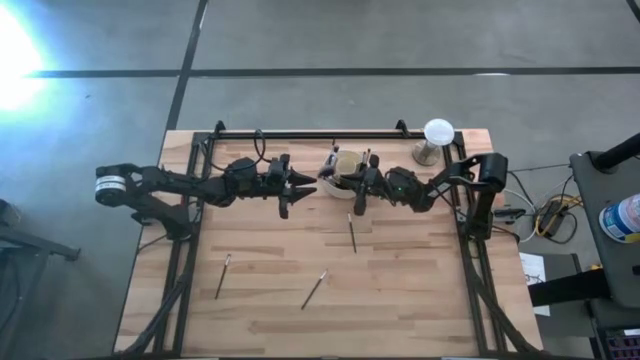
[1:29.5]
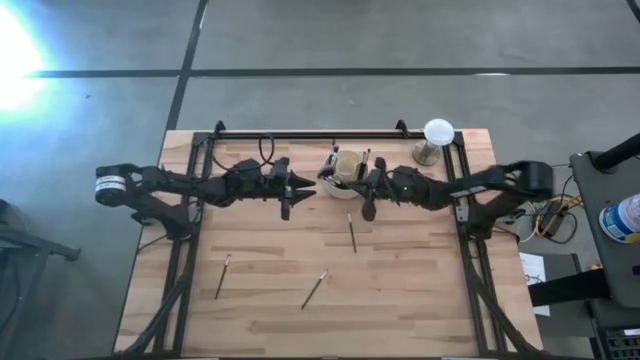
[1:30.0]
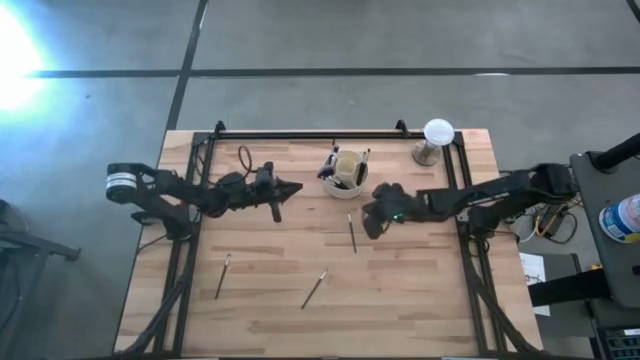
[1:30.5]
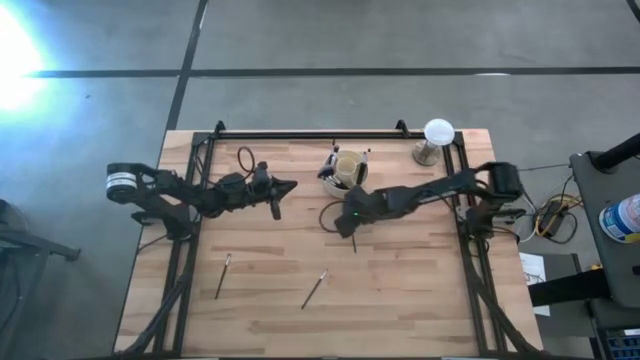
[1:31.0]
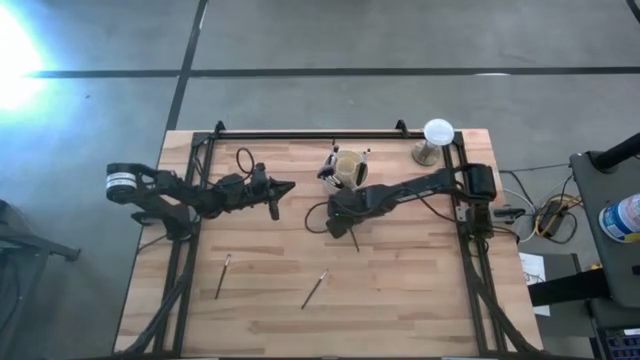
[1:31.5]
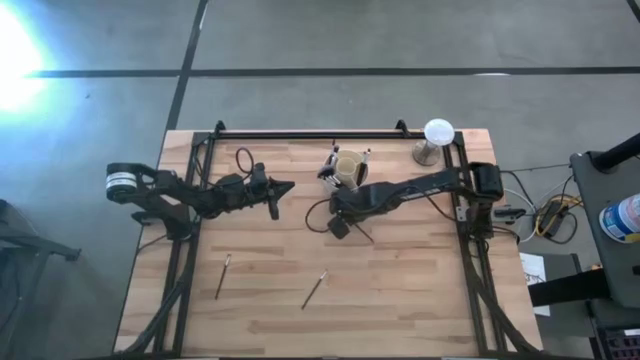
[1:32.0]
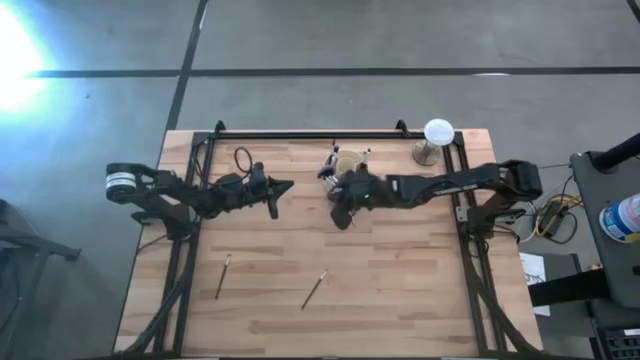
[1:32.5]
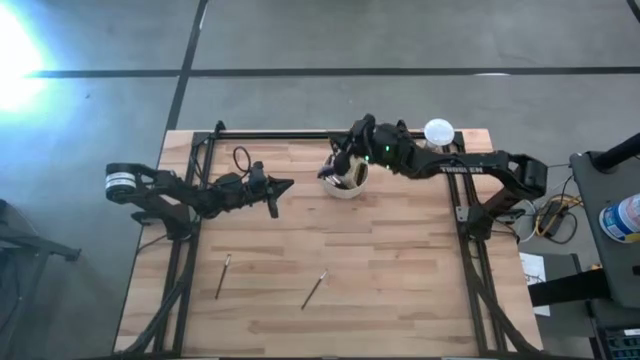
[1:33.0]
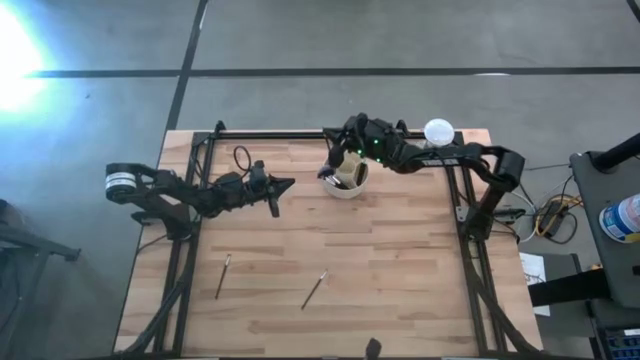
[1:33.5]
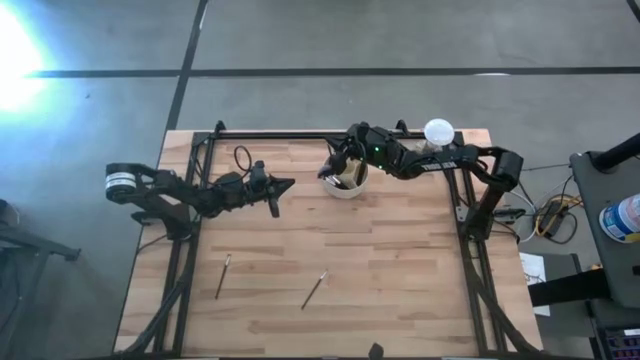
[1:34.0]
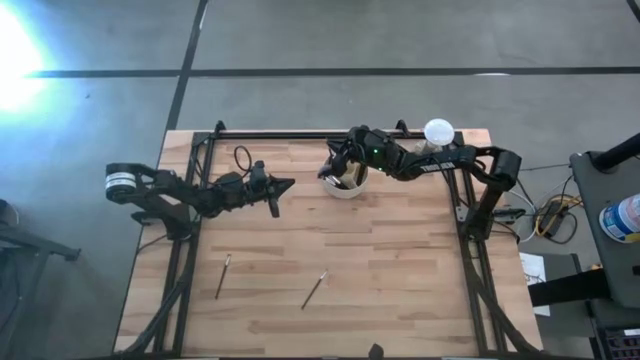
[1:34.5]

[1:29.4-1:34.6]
Task: Put items in baskets/containers
Put the black silver eyeshadow brush into the pen organizer

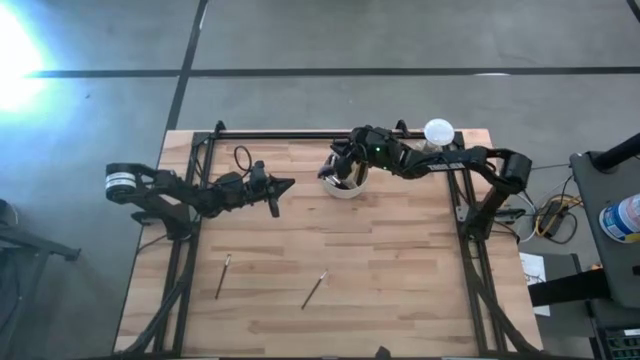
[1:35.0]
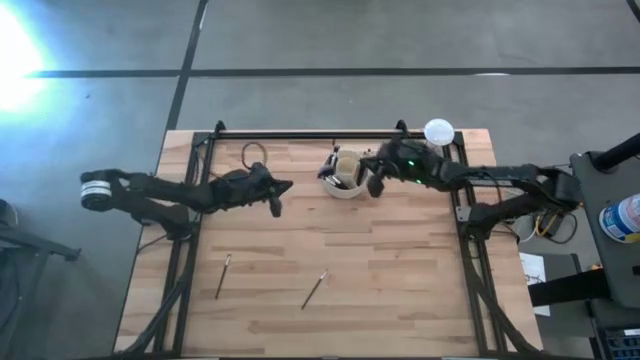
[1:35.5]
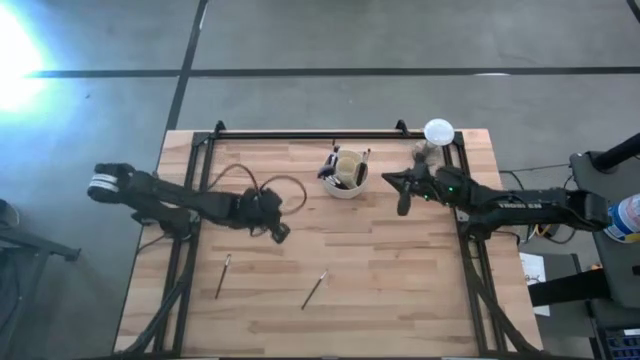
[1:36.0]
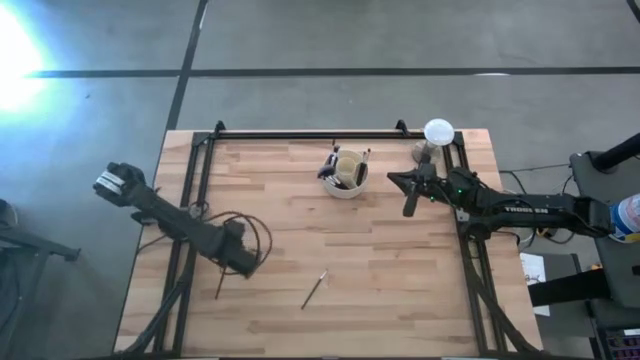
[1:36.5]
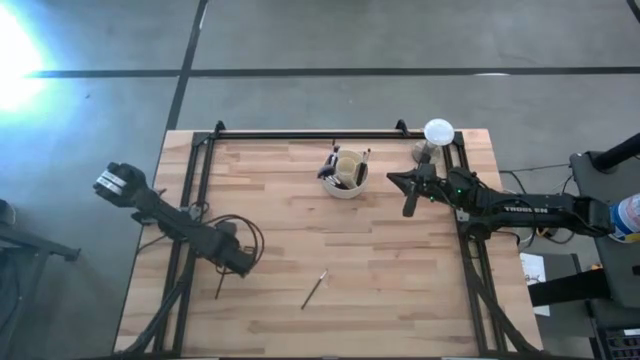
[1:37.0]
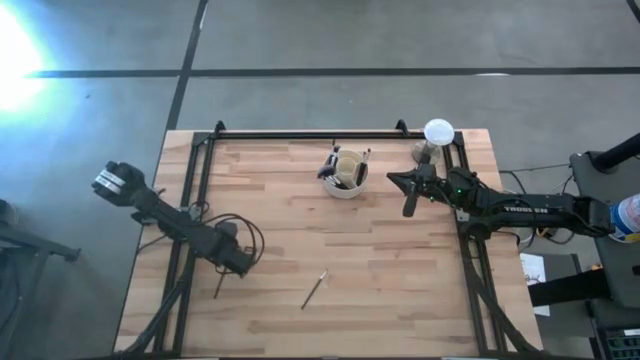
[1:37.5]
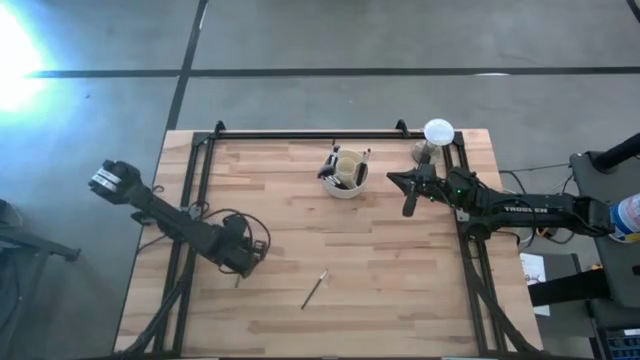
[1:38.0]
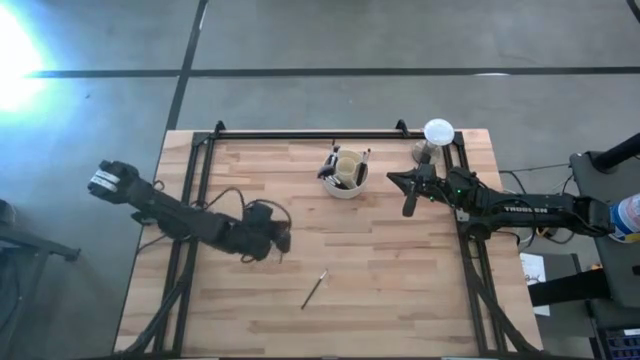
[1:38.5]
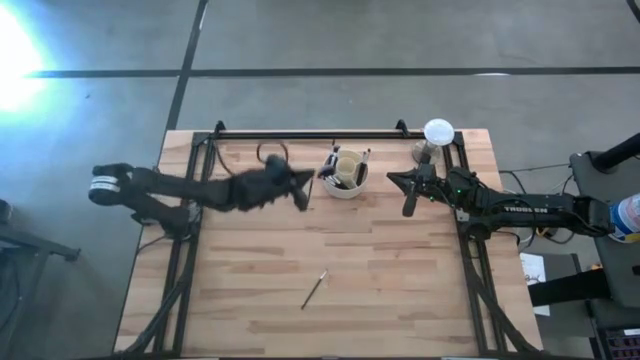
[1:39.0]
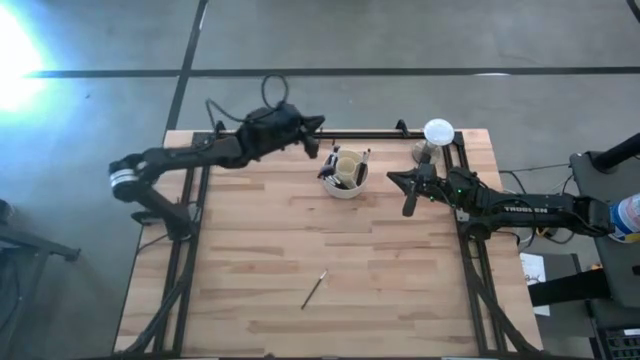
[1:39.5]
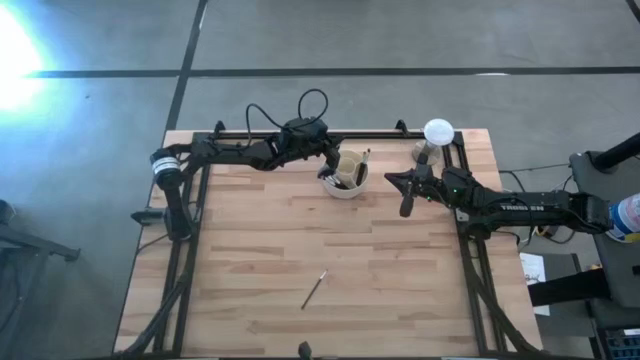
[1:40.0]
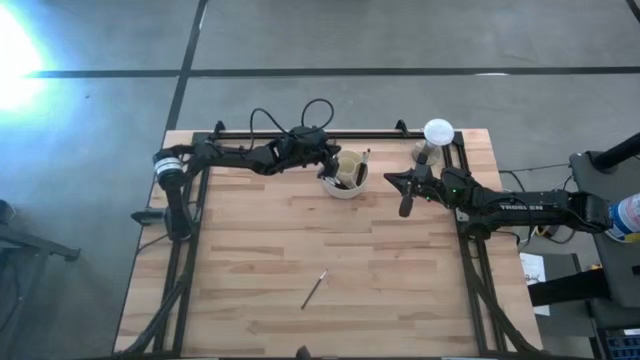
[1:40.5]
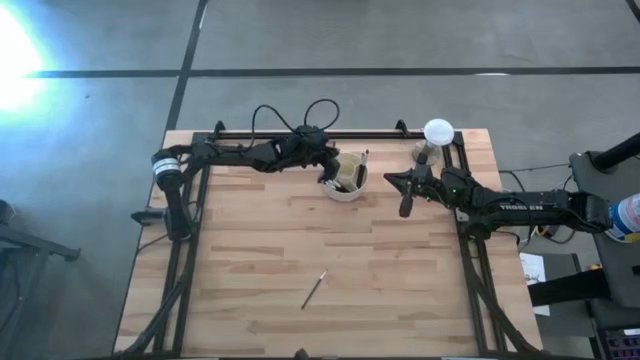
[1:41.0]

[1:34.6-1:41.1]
Put the black silver eyeshadow brush into the pen organizer

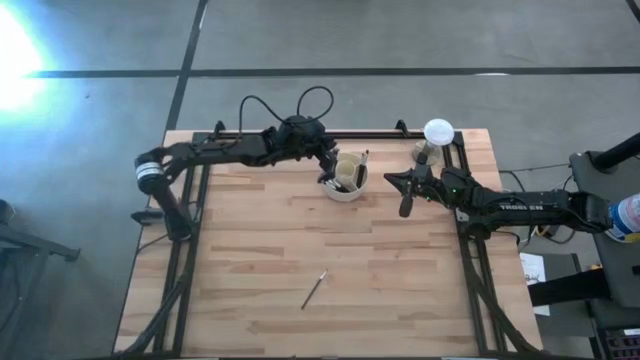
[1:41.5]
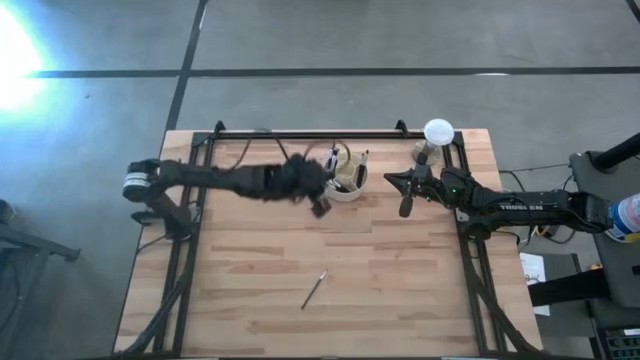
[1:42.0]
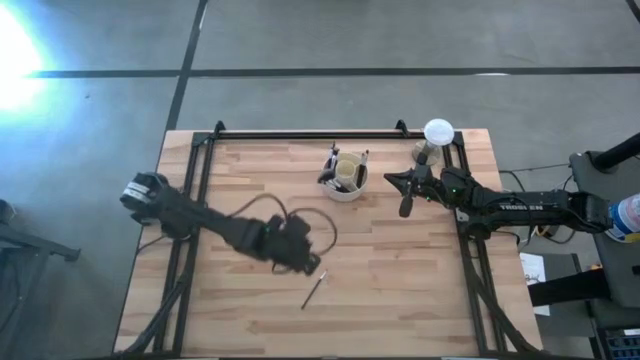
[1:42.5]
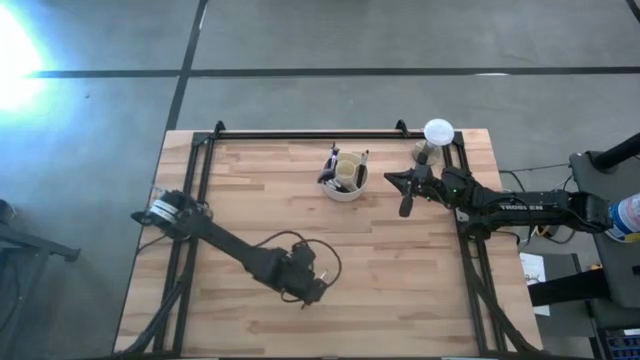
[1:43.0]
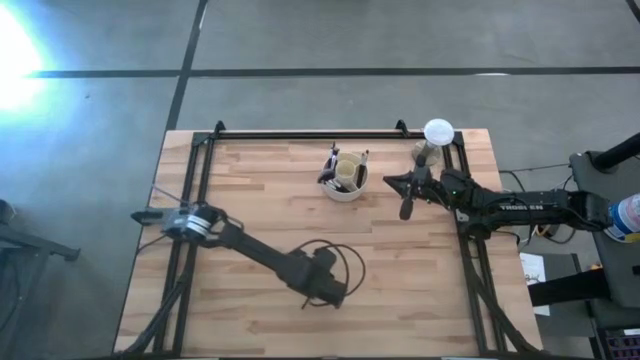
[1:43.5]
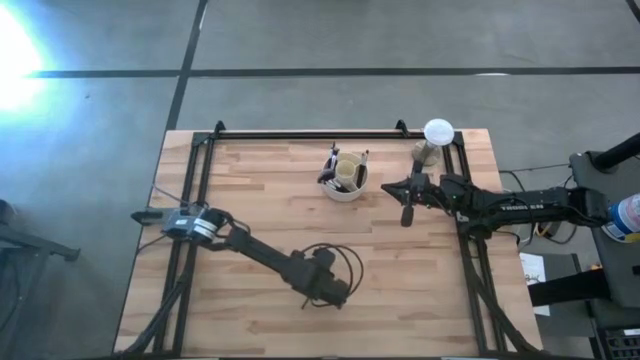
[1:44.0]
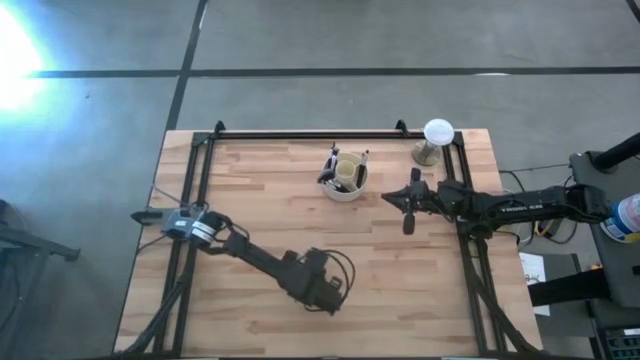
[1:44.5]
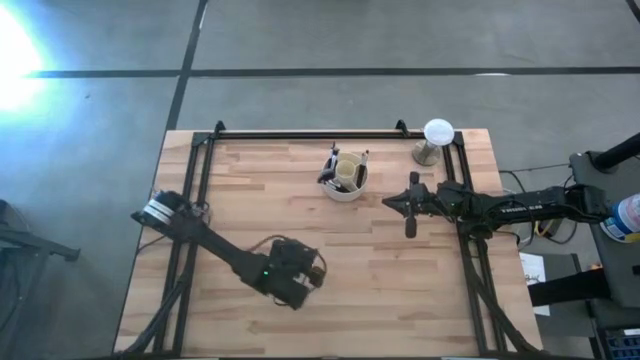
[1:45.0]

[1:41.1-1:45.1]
Put the black silver liner brush into the pen organizer

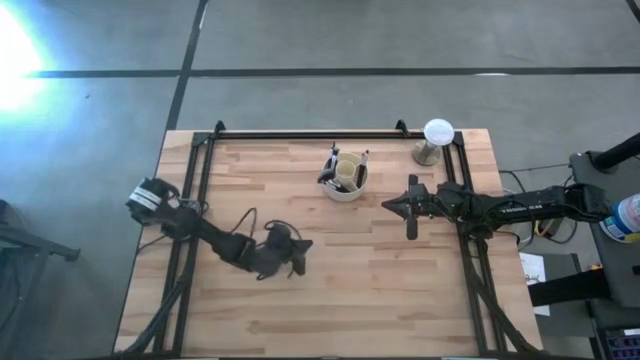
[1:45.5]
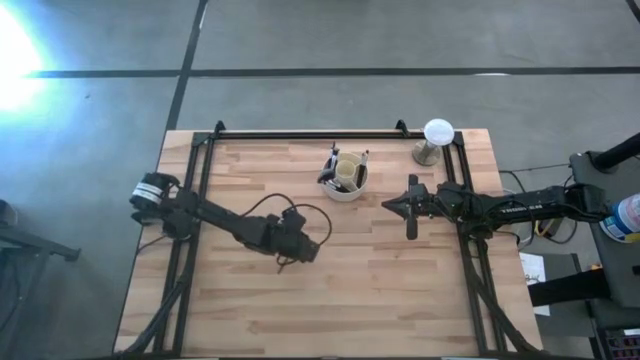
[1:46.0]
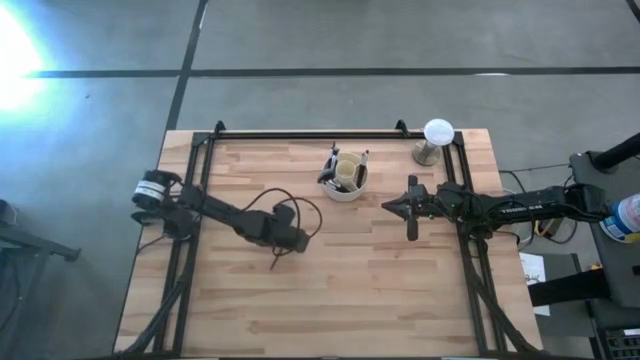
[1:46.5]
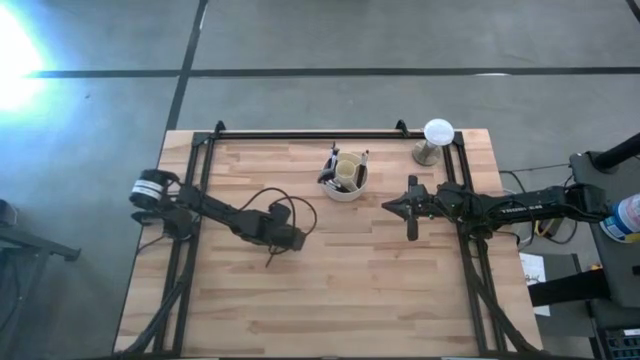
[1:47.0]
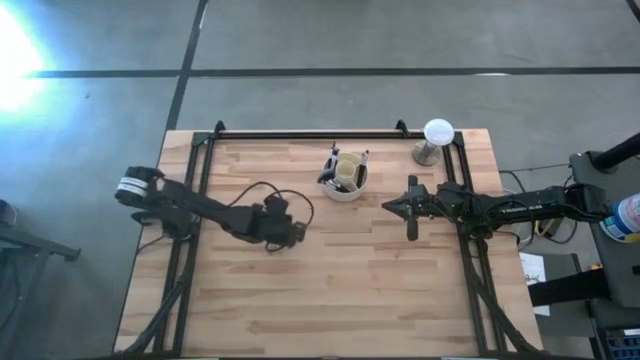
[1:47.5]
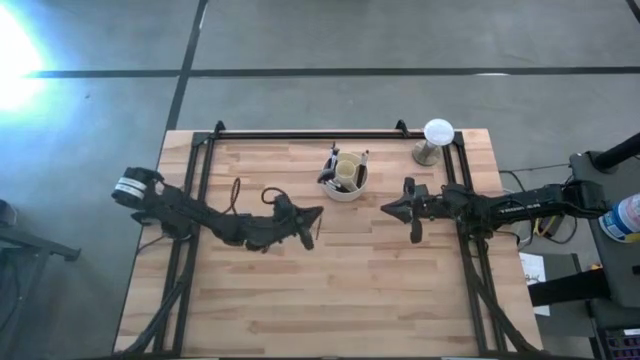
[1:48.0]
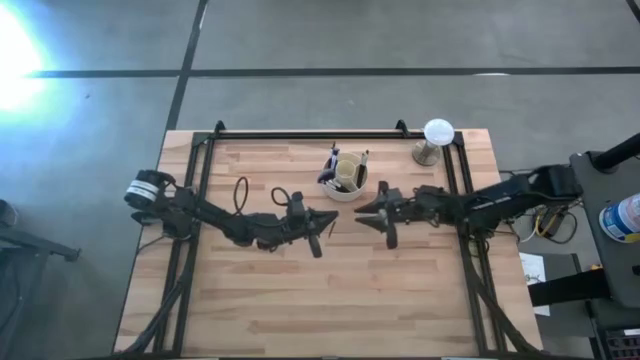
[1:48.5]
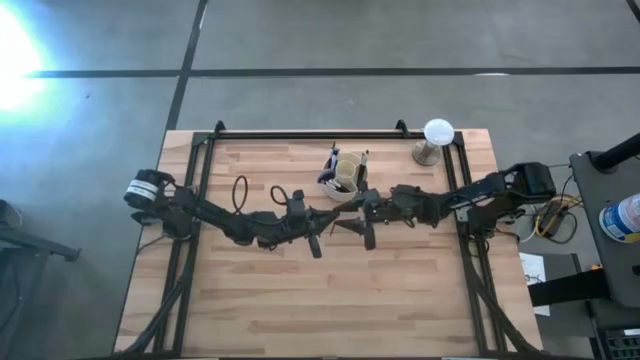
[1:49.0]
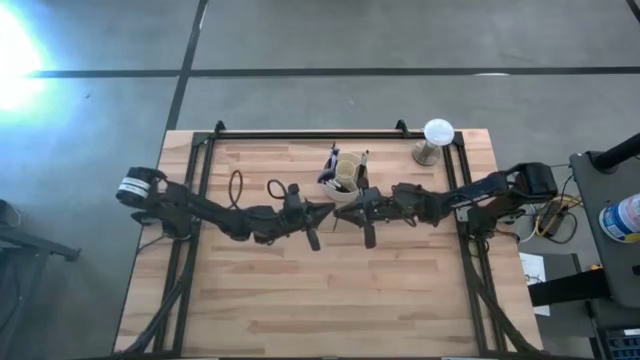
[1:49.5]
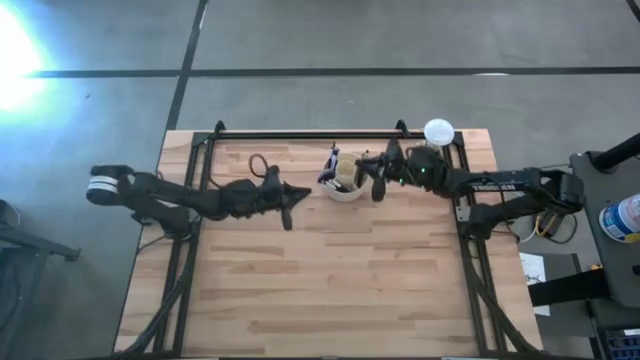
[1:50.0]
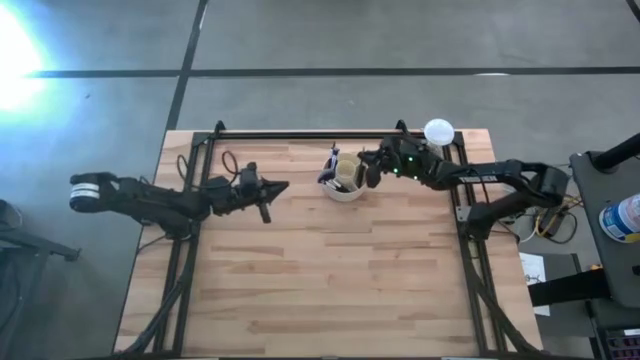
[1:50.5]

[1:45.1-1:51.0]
Put the black silver liner brush into the pen organizer
